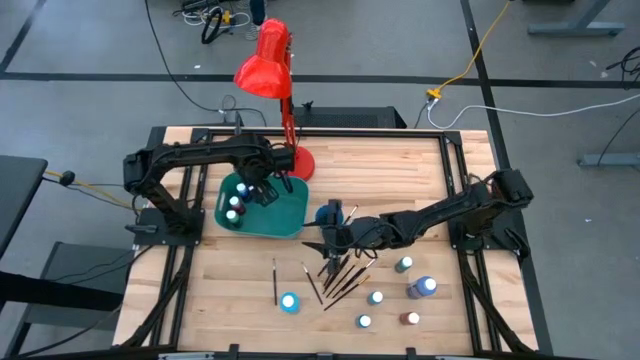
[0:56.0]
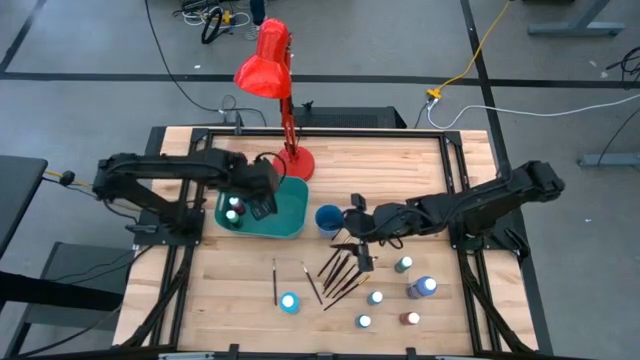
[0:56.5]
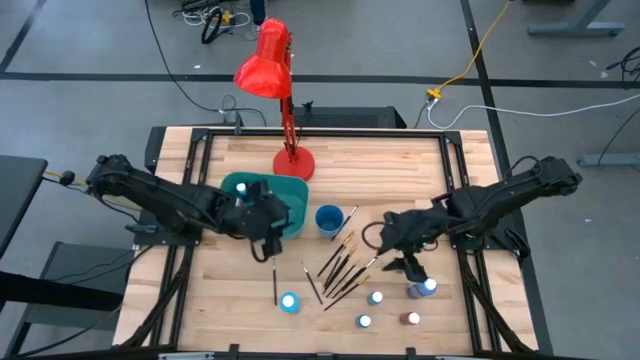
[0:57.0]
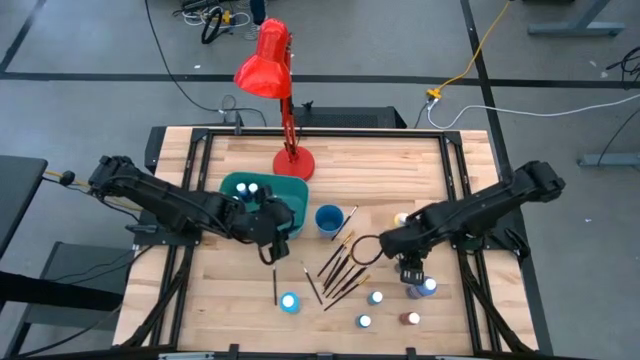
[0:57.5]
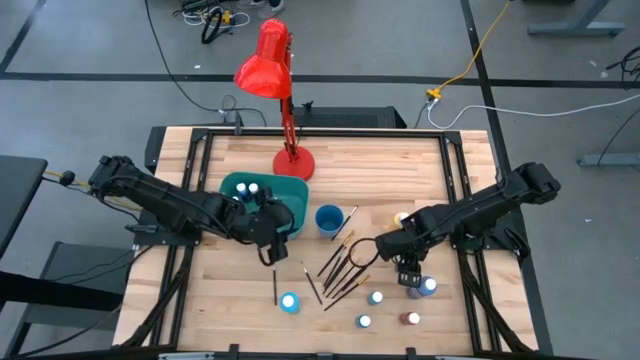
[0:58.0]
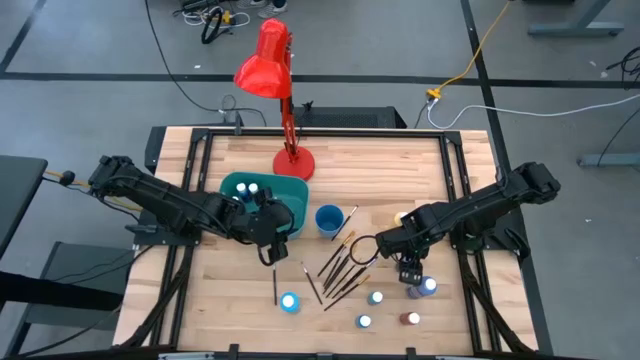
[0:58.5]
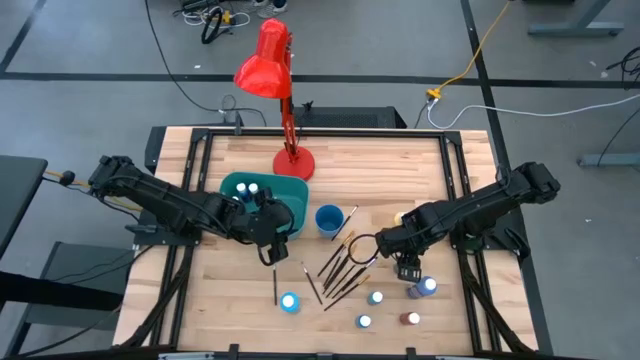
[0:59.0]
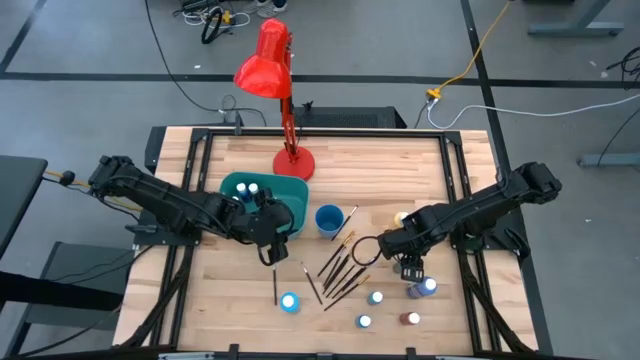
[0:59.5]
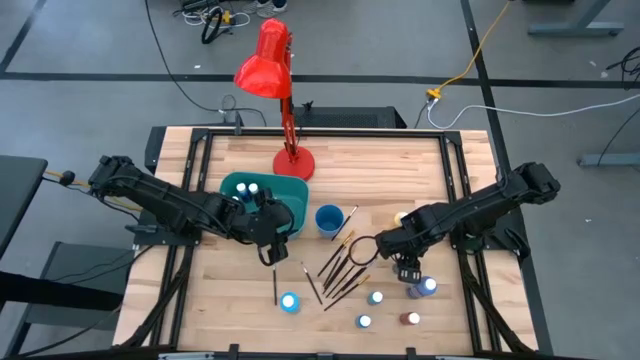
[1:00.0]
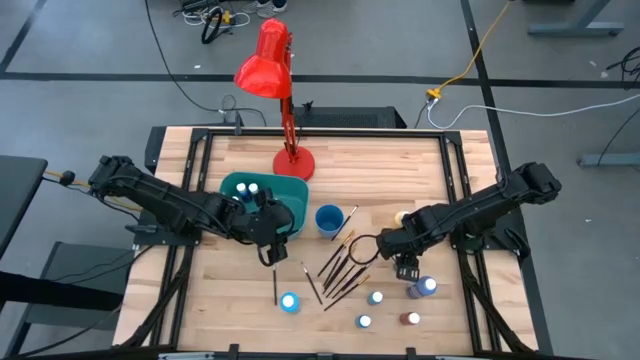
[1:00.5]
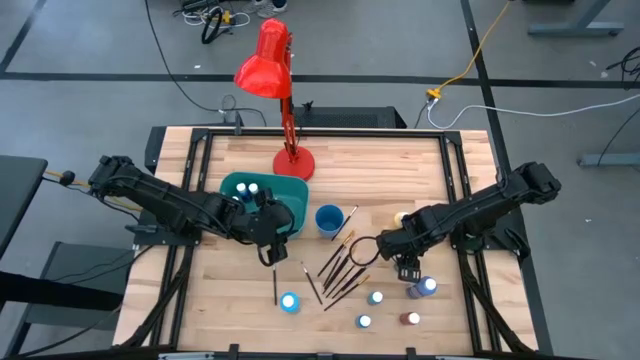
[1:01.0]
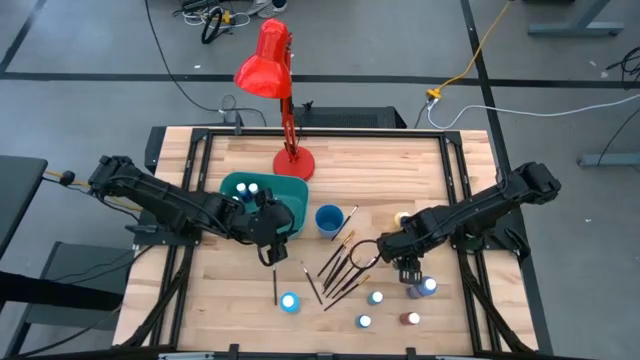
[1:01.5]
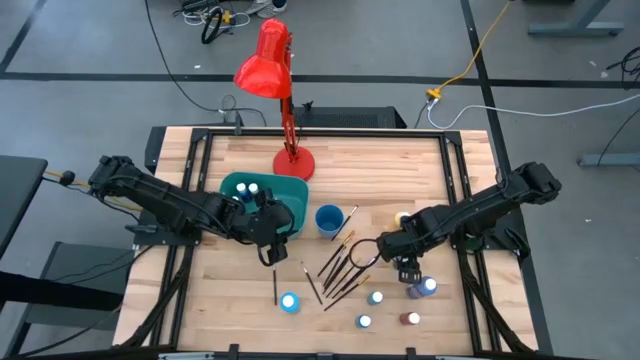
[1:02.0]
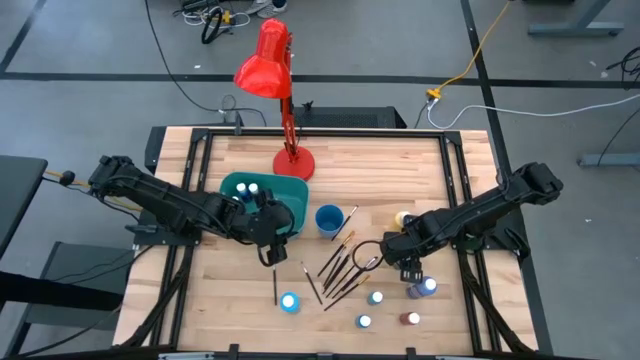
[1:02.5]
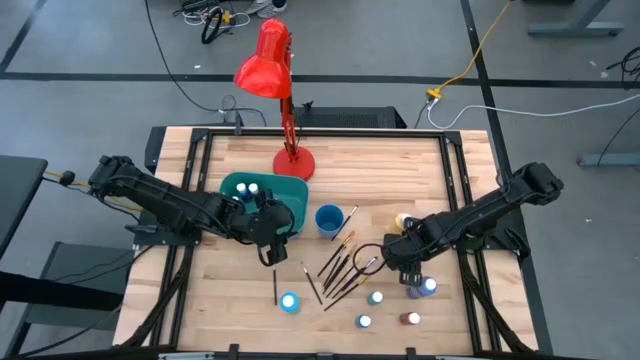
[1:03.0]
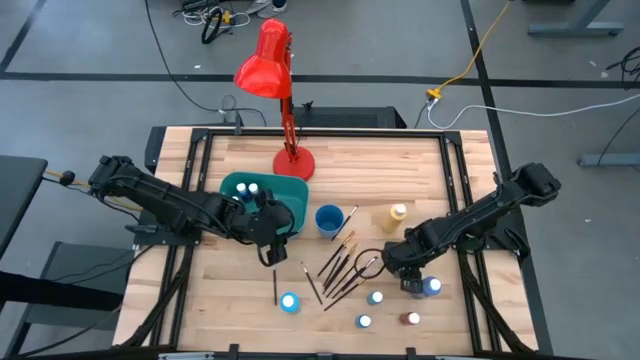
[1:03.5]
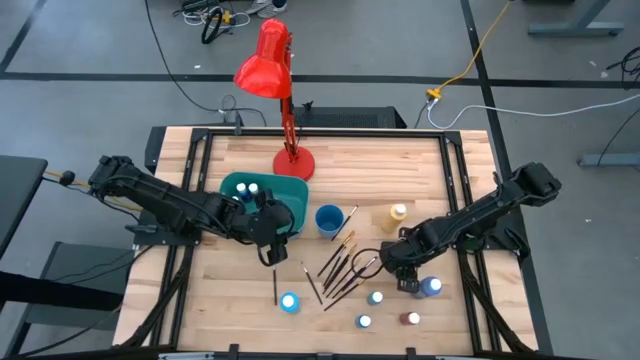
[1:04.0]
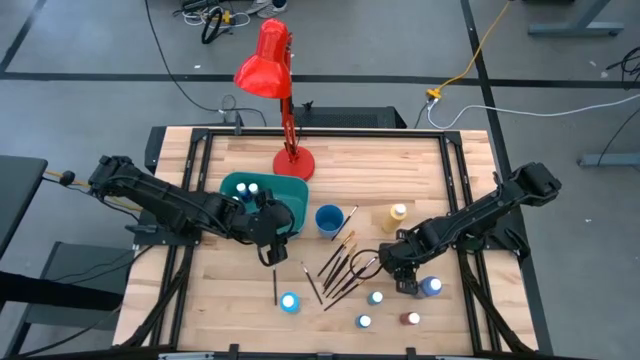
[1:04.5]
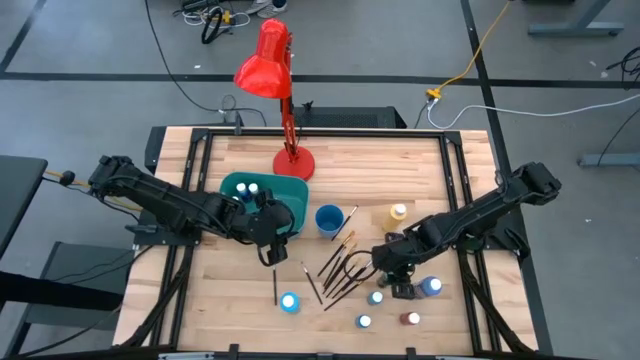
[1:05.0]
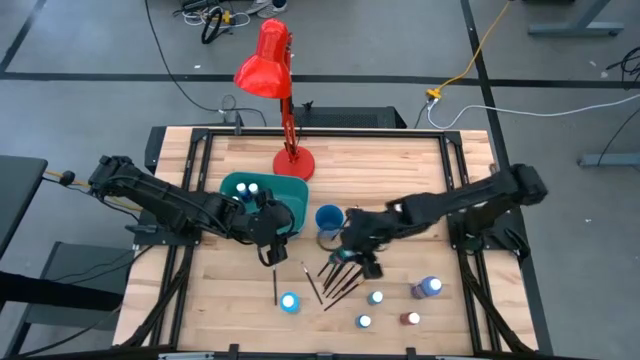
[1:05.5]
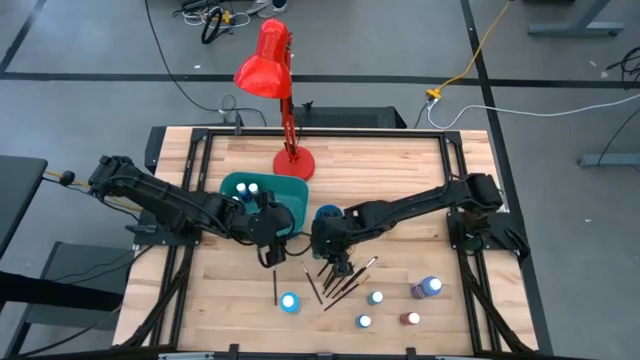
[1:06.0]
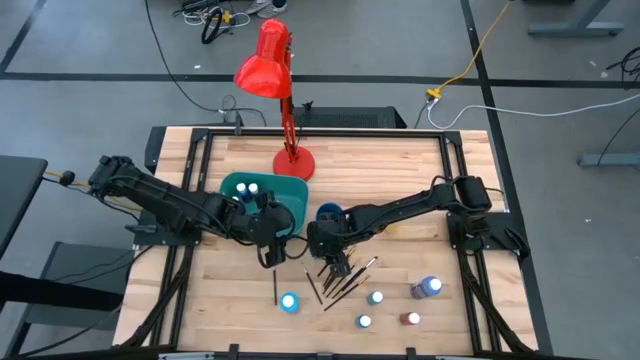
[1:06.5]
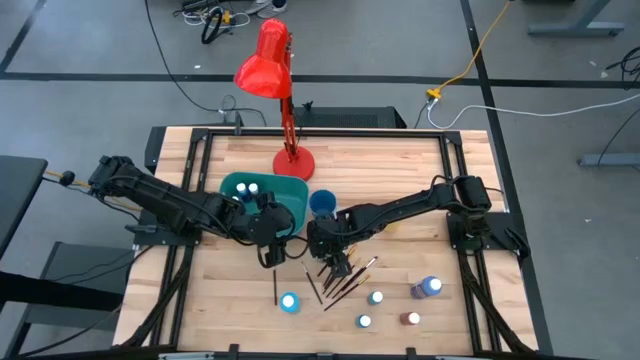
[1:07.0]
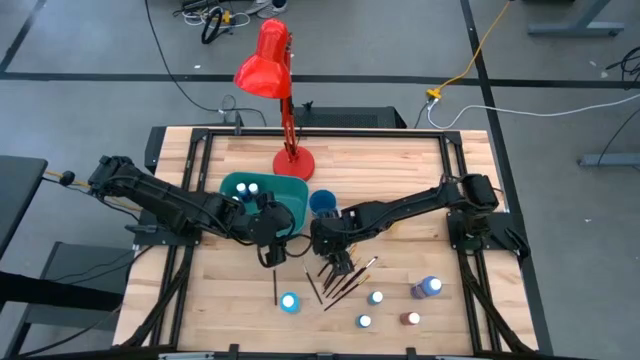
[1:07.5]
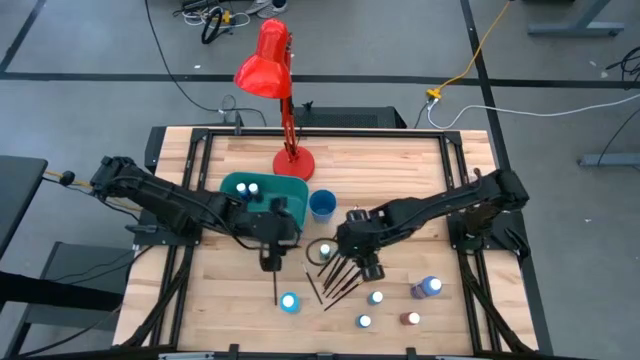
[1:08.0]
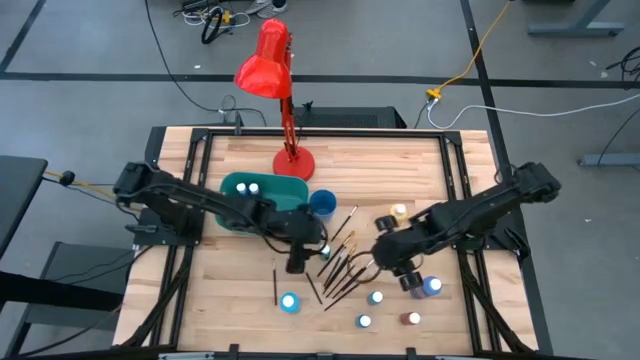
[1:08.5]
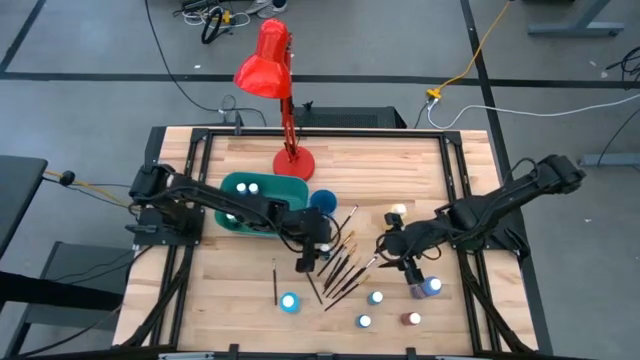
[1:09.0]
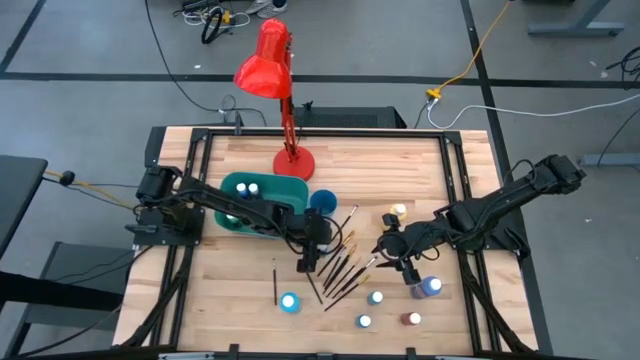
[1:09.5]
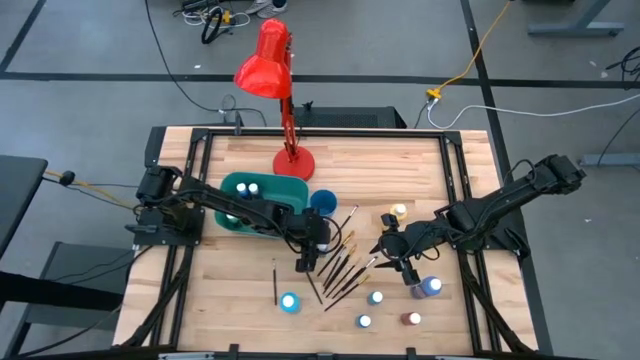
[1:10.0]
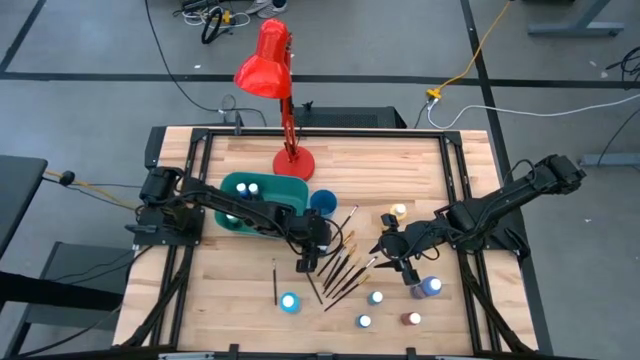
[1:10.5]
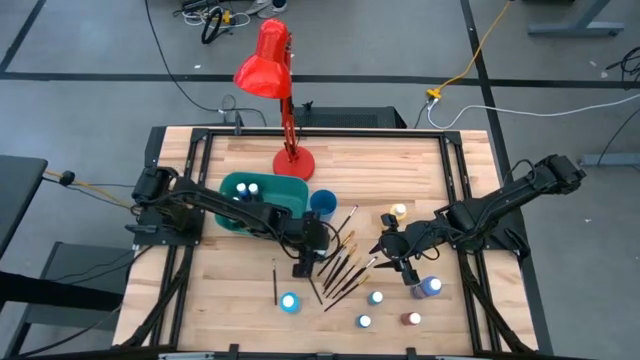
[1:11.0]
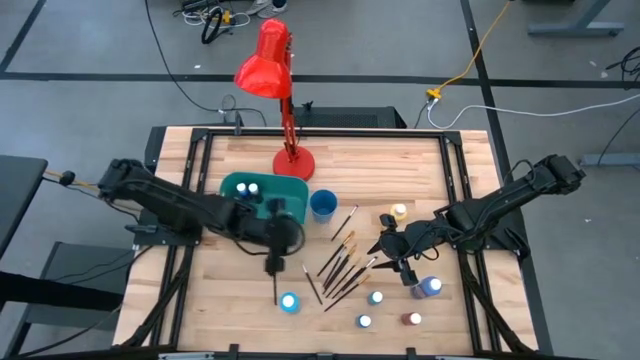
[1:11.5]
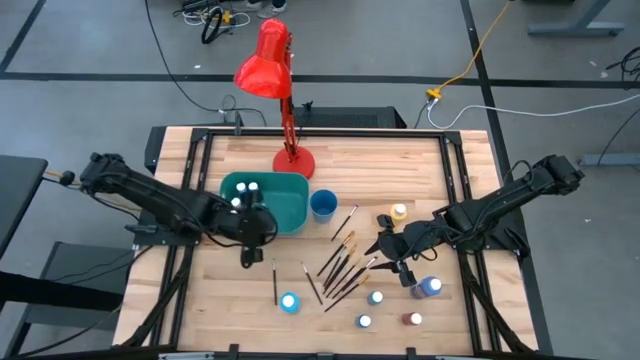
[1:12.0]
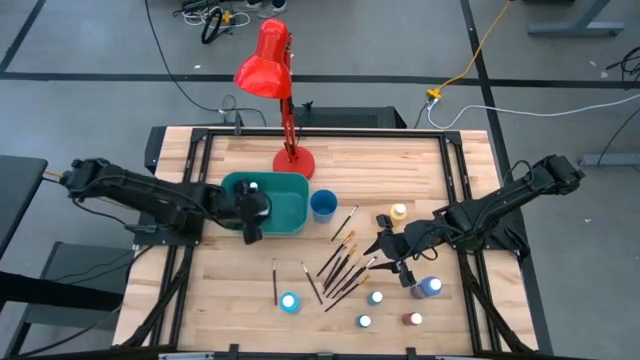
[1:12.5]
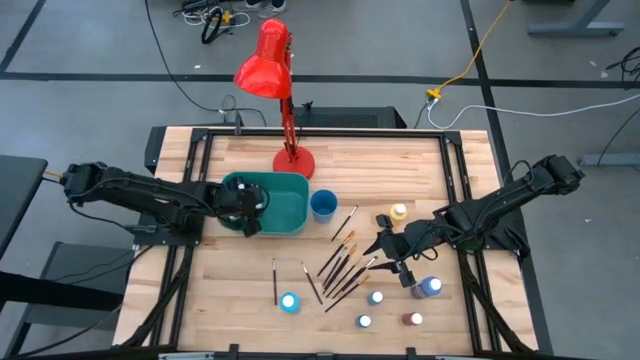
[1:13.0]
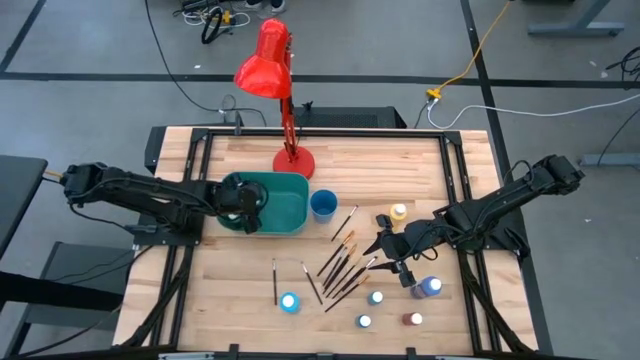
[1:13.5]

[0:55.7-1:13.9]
Task: Pick & Place Paint Supplies
Put the blue green paint bottle into the green bin
